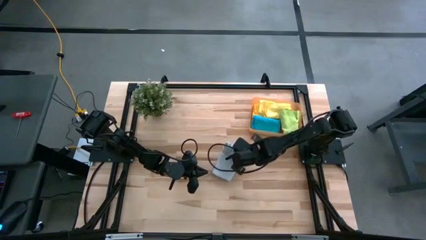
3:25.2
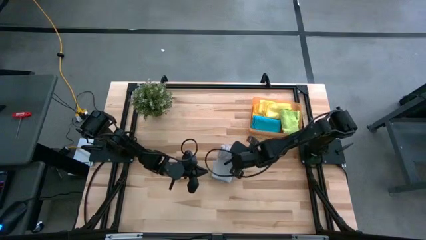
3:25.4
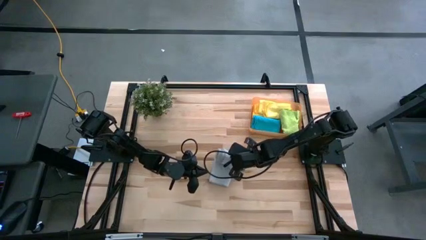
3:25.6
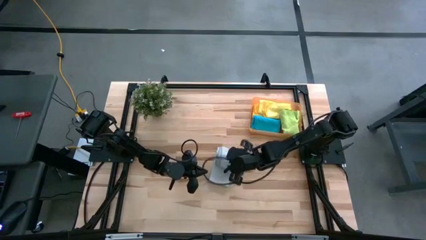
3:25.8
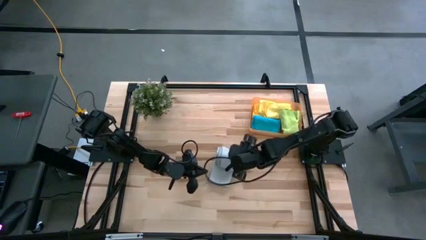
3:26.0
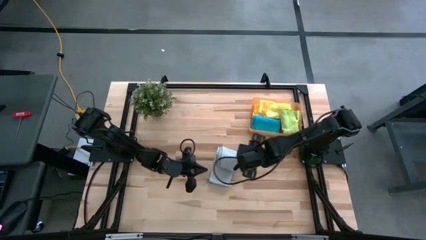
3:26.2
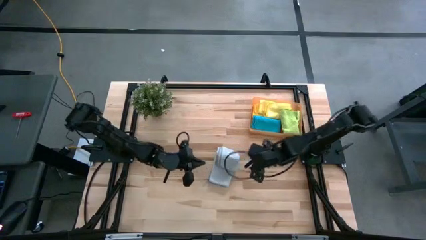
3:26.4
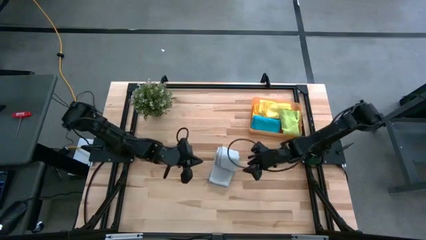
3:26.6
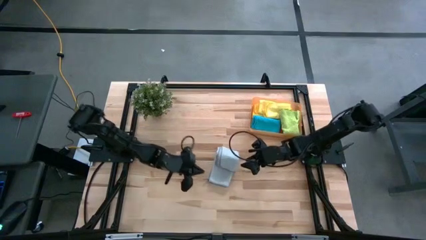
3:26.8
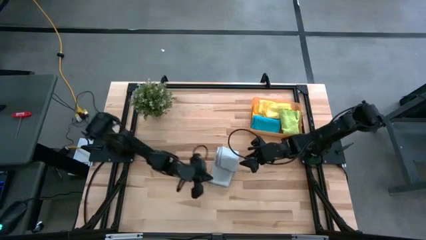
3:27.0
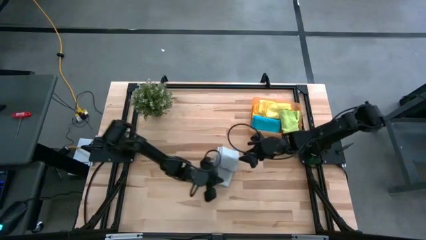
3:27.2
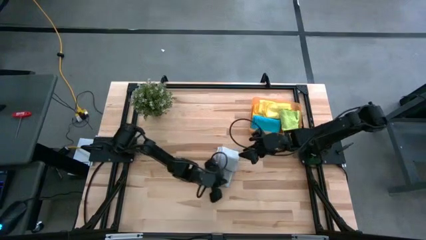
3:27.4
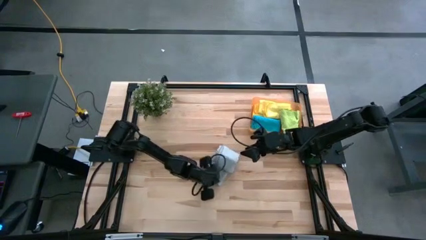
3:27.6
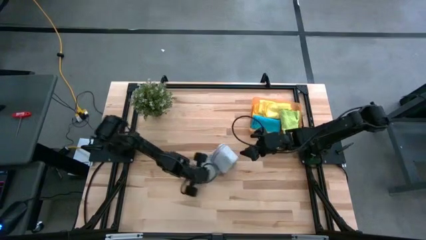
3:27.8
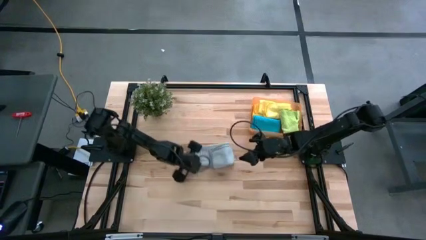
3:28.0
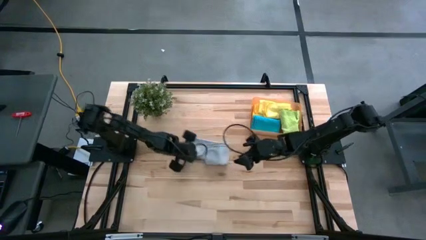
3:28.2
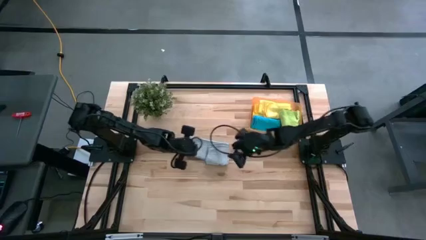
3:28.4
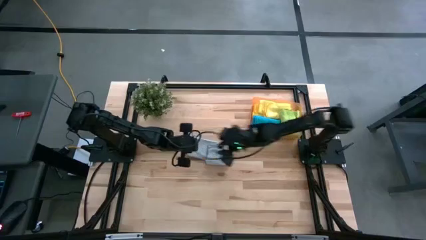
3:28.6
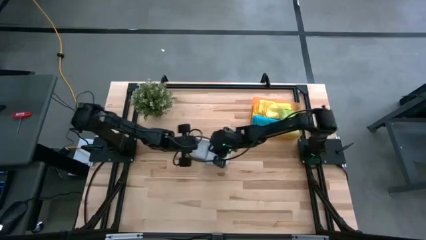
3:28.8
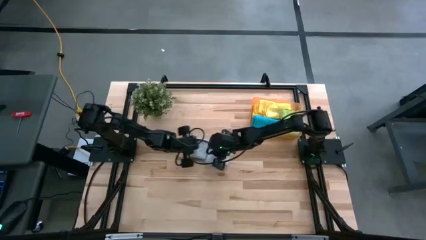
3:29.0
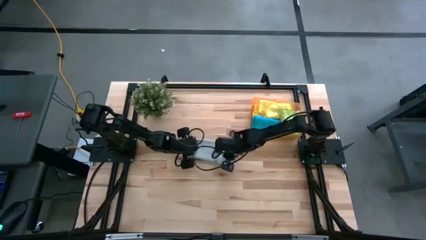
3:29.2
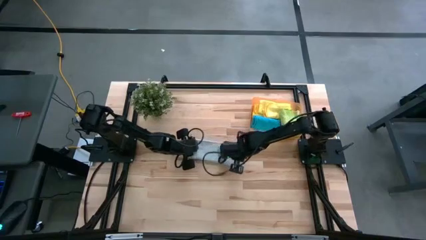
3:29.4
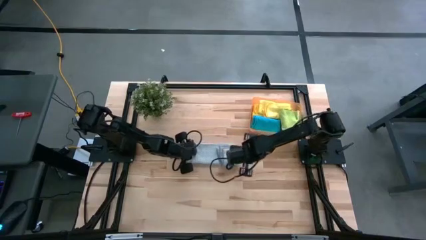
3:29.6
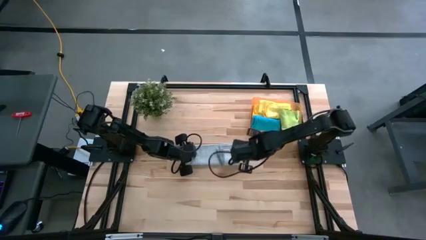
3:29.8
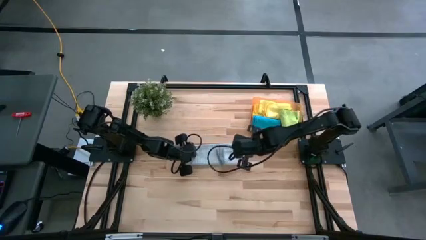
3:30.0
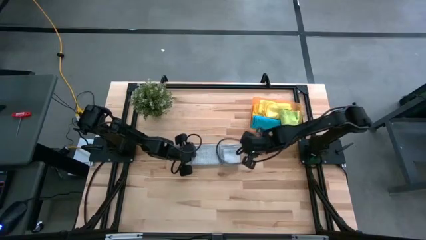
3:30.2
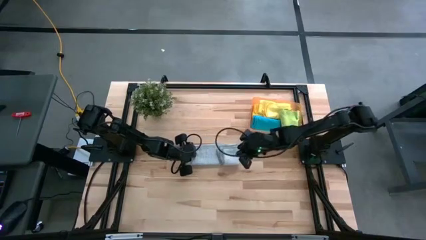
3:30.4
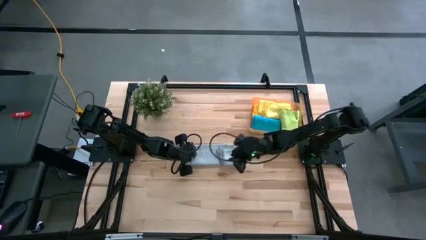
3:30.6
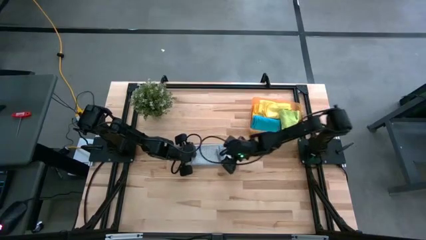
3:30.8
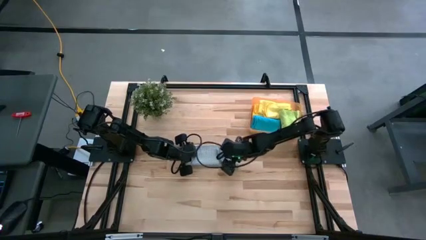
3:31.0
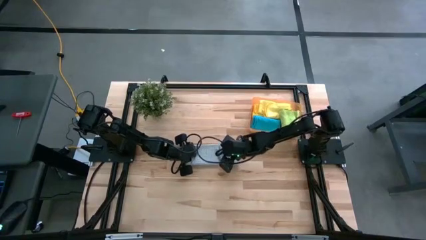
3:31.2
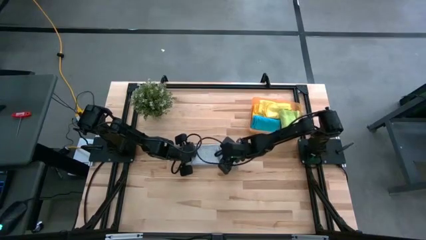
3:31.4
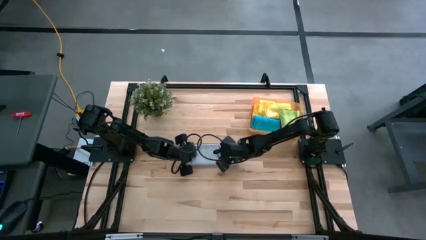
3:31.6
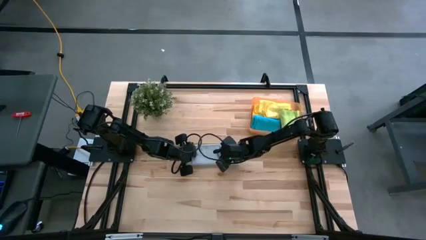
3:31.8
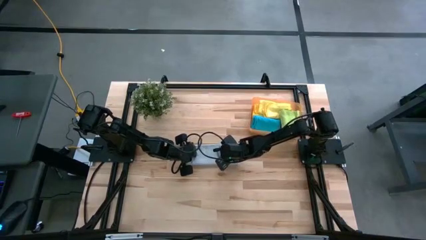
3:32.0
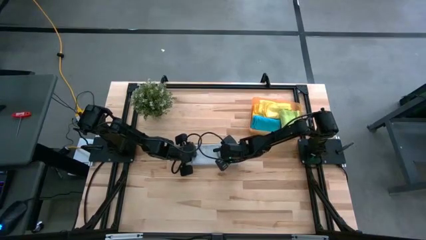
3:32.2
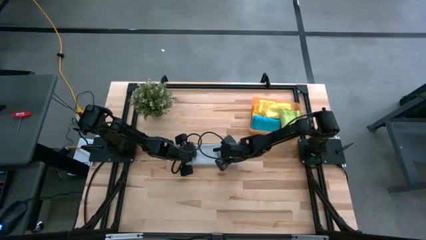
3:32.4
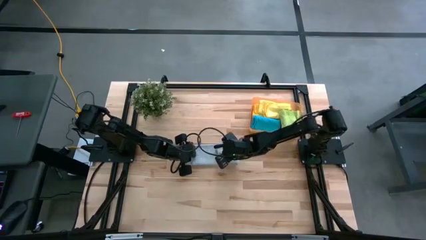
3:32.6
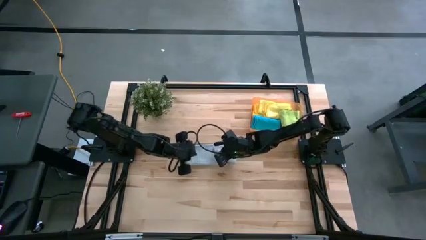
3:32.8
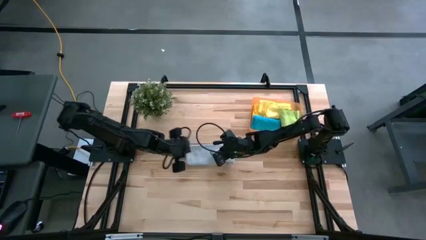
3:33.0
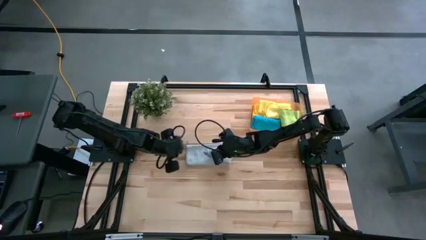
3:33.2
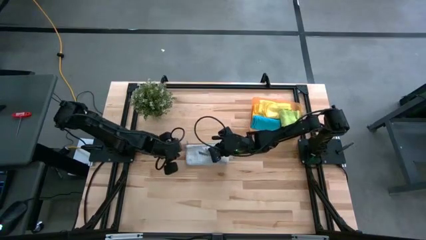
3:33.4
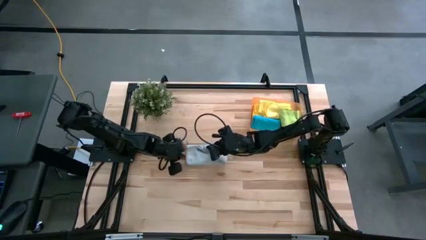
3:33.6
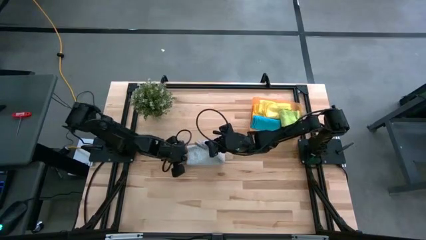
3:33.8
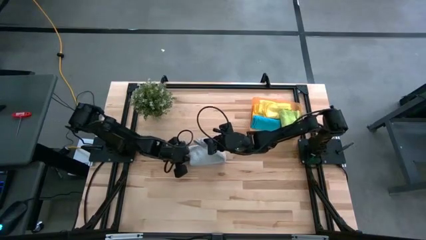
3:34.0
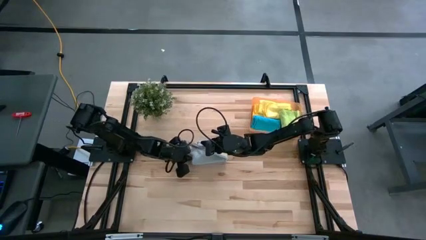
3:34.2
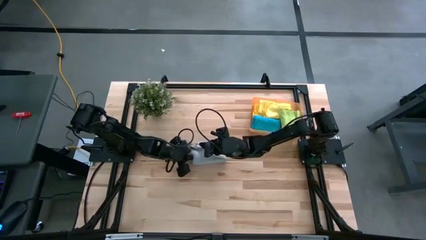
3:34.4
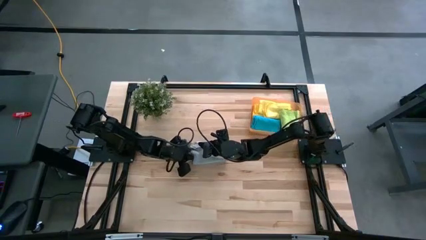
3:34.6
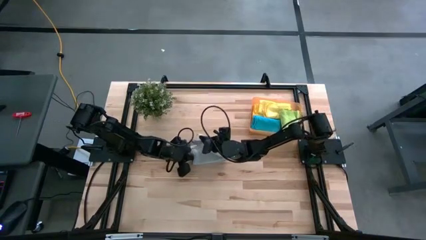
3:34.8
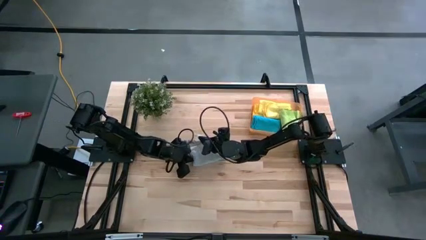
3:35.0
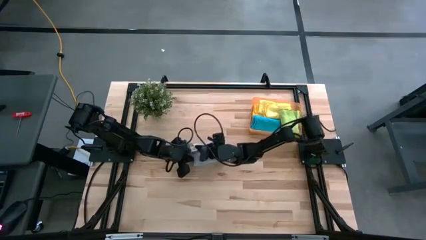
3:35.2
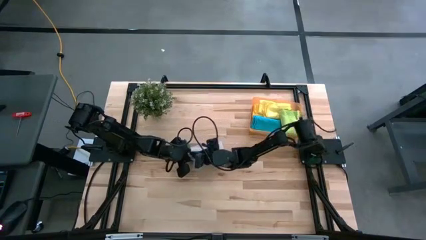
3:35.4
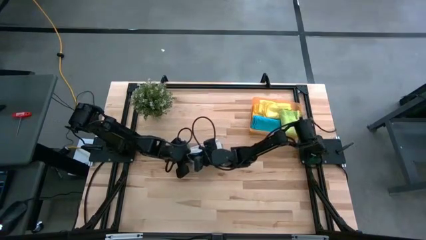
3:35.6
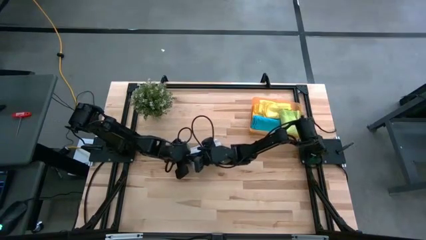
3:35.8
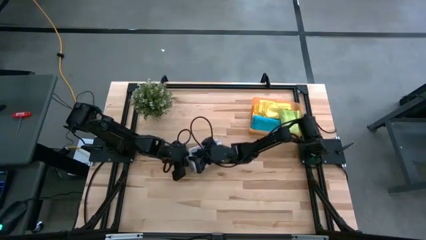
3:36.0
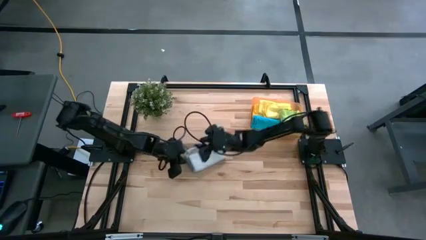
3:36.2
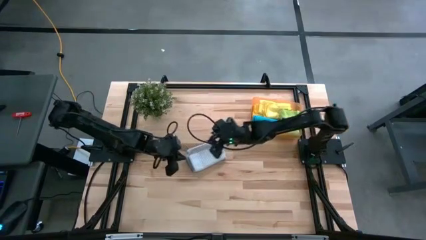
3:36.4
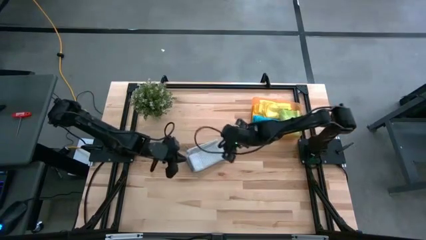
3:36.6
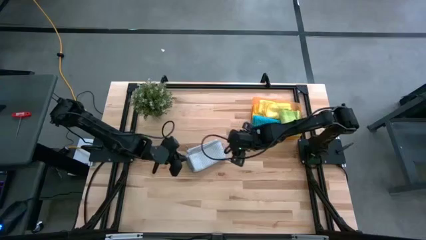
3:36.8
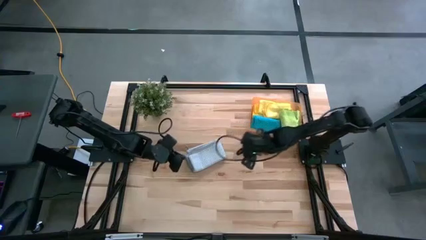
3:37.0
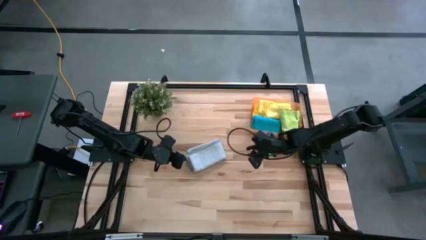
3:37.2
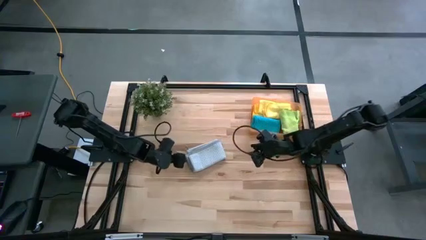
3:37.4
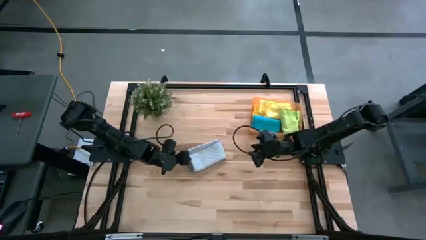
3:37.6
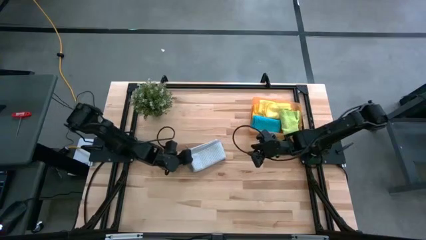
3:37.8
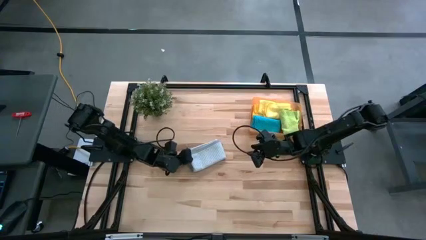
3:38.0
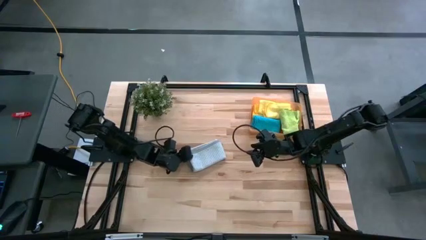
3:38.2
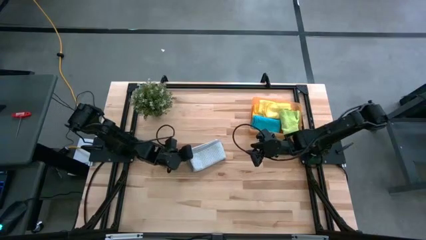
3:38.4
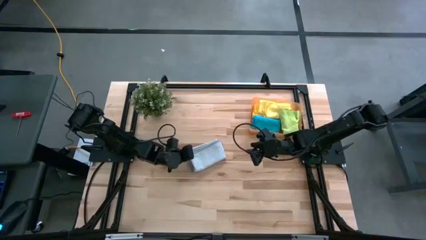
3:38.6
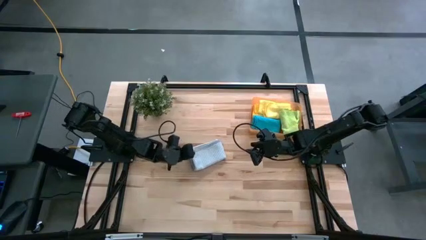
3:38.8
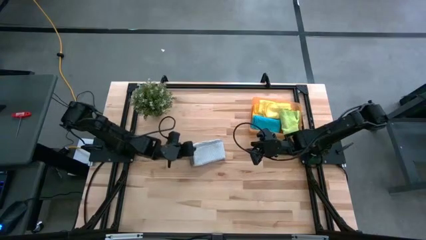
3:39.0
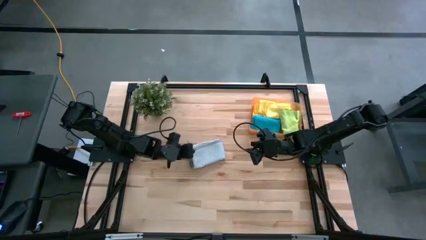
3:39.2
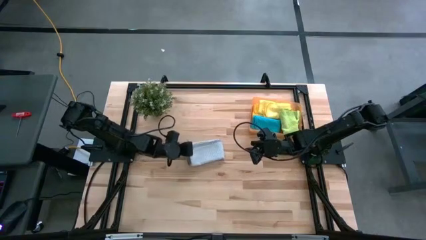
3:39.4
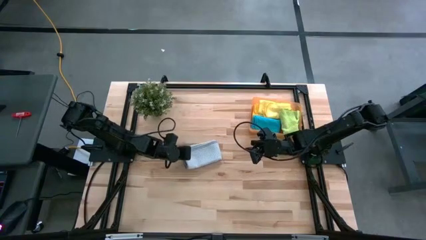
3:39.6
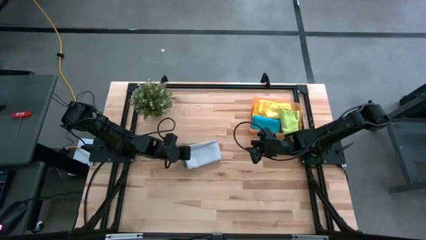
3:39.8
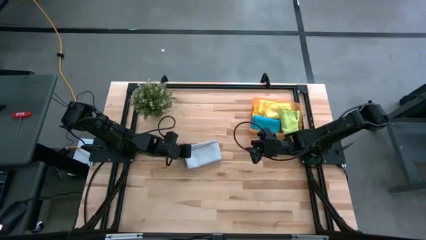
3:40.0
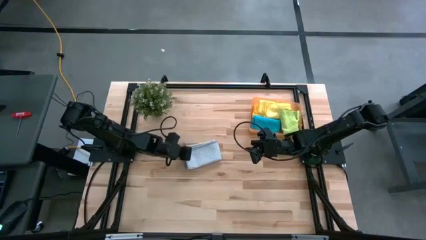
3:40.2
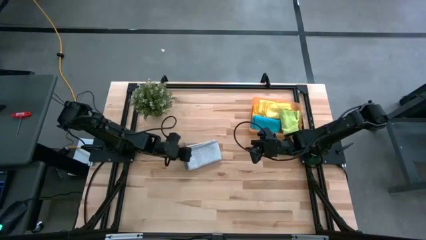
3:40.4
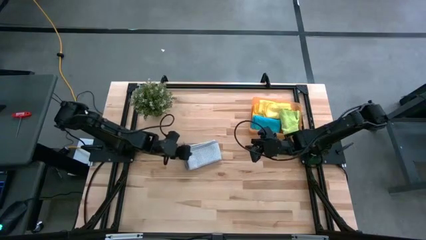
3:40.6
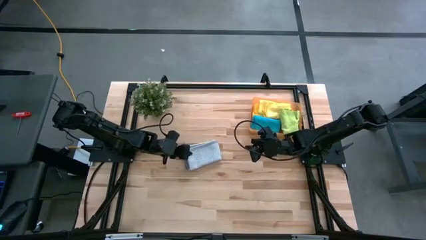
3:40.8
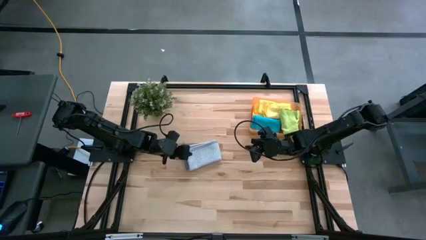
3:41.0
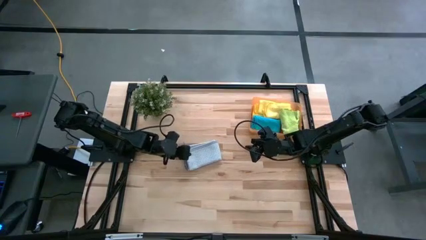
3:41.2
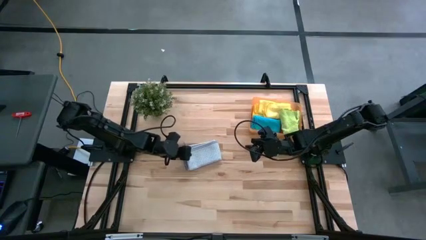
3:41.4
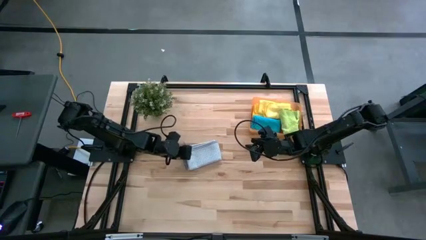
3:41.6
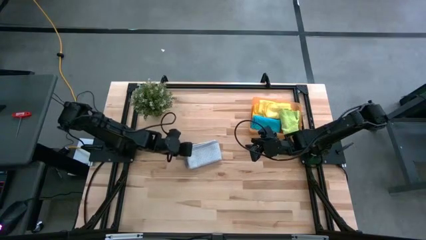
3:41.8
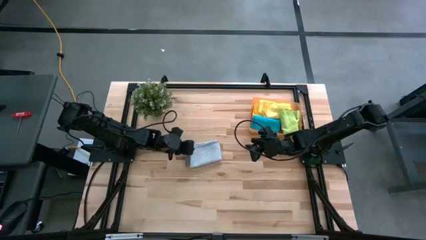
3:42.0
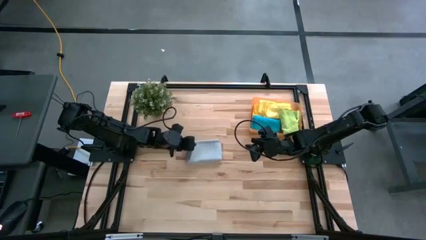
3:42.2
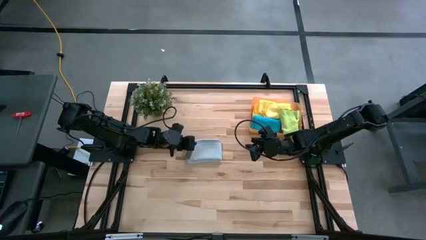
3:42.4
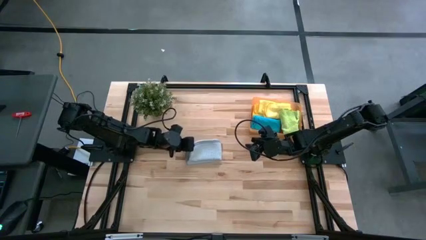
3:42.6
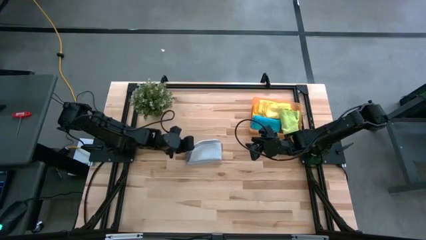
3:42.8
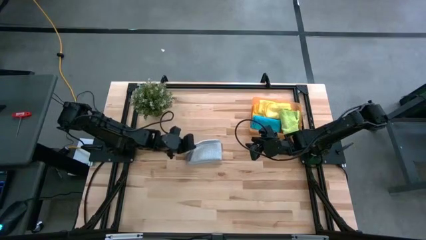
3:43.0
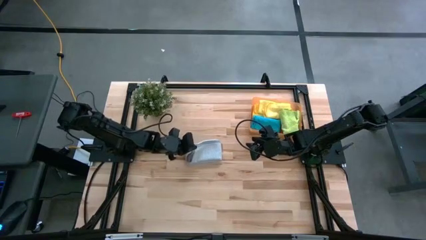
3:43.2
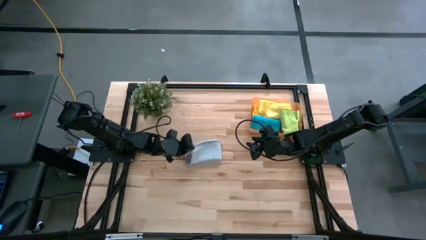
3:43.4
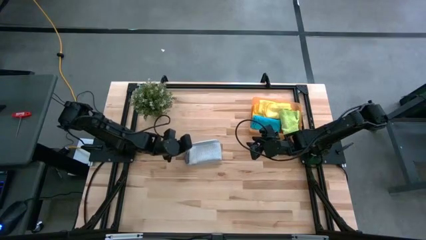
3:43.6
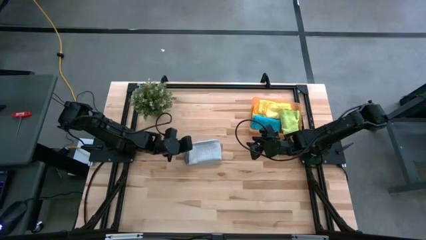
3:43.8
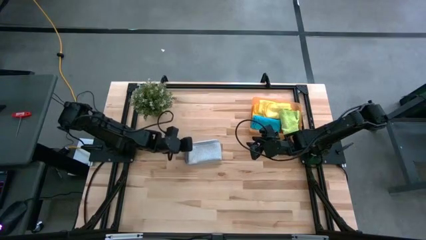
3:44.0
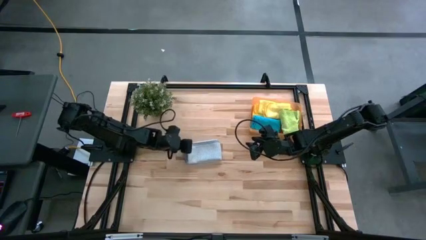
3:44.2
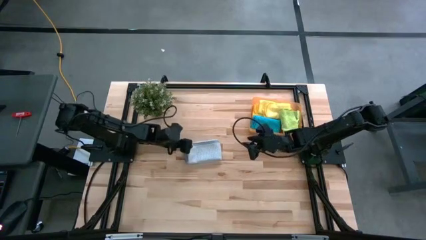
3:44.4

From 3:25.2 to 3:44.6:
Task: Fold microfiber towels
Fold the gray microfiber cloth
